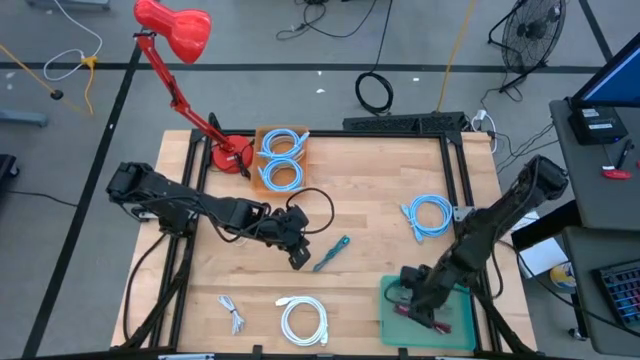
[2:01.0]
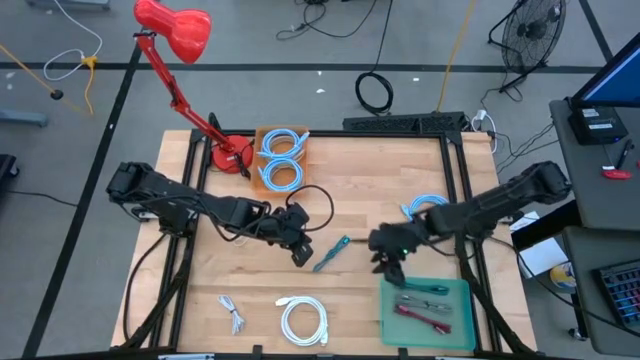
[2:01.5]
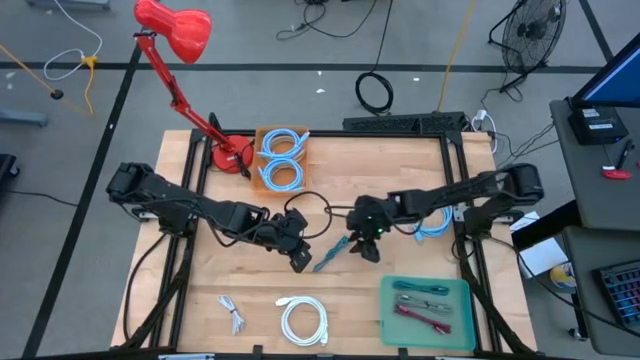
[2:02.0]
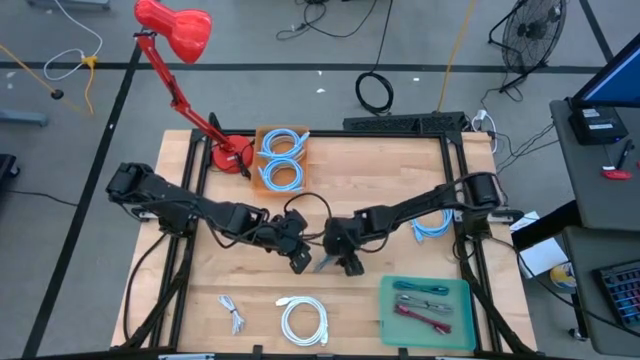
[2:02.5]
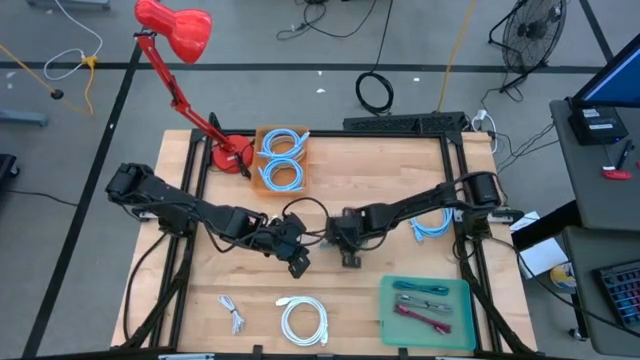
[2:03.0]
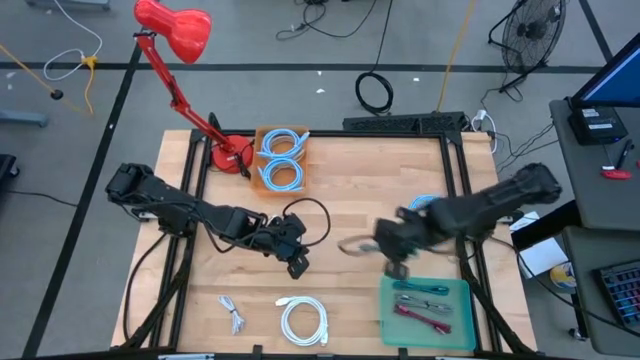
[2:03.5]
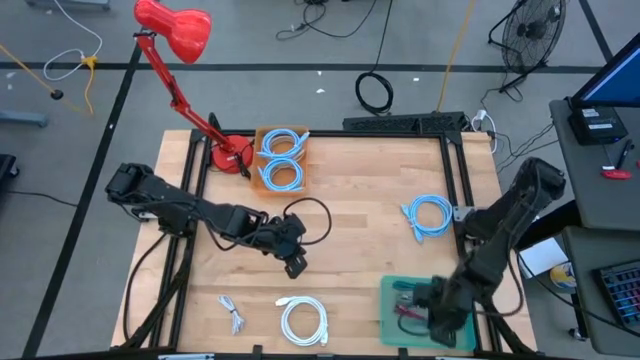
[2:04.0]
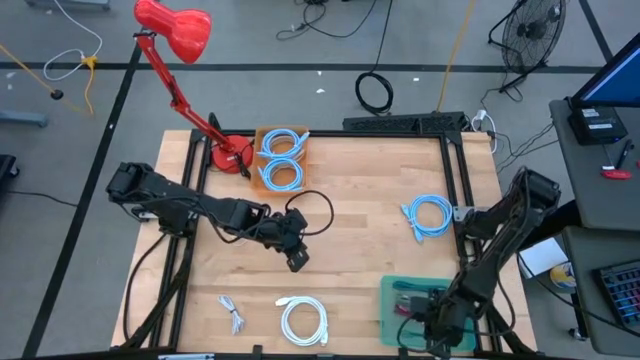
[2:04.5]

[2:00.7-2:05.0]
Task: Pick & Place USB Port
Put the dark blue charger cable into the green bin

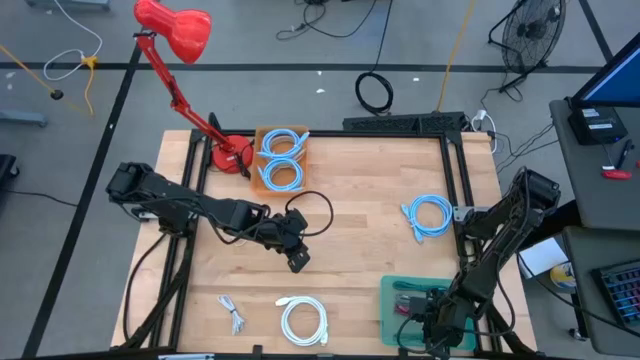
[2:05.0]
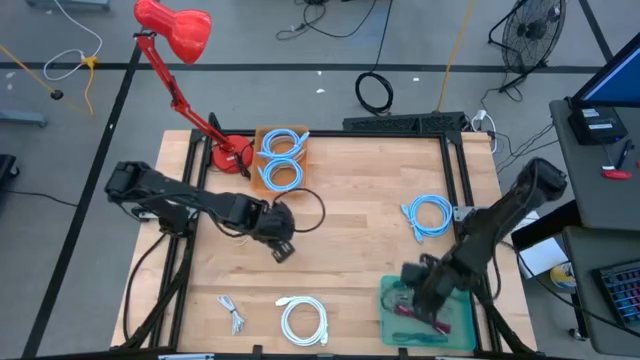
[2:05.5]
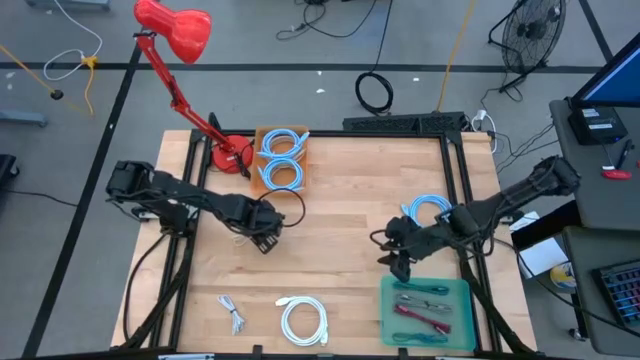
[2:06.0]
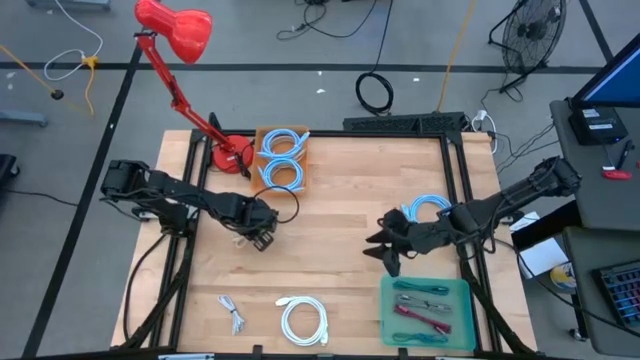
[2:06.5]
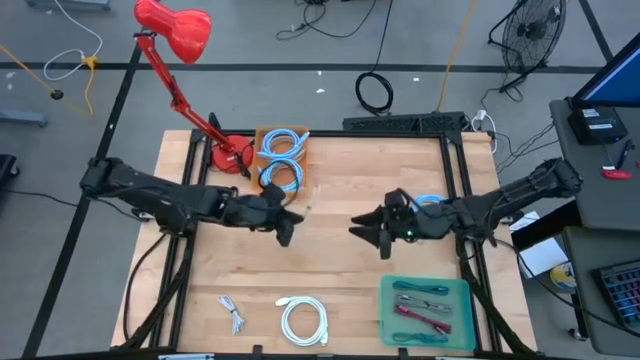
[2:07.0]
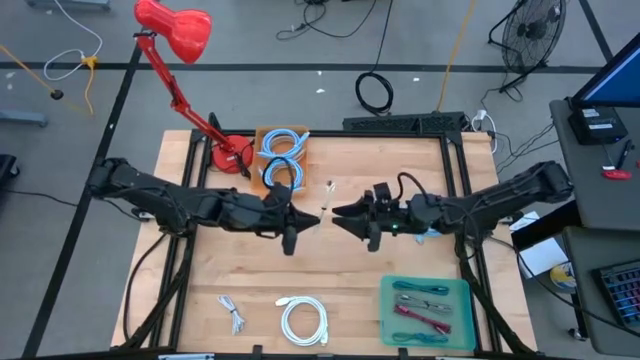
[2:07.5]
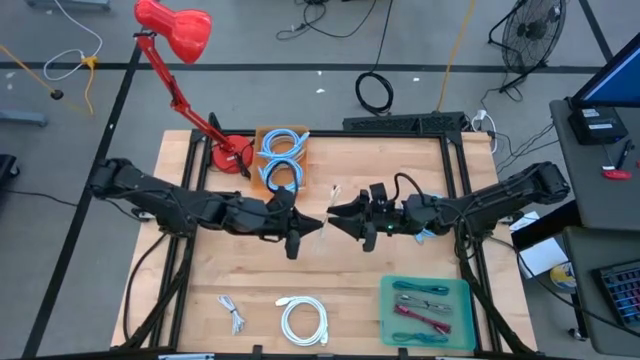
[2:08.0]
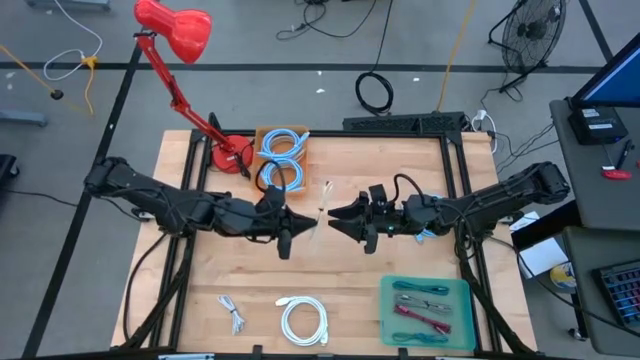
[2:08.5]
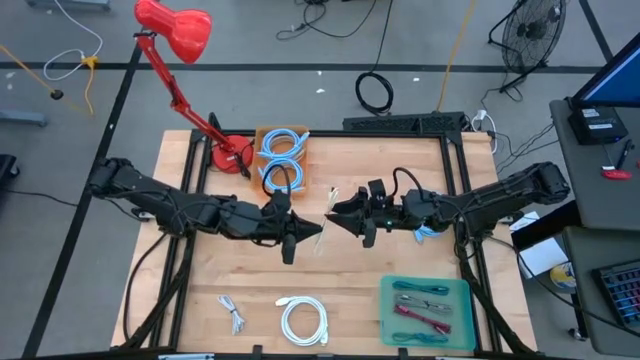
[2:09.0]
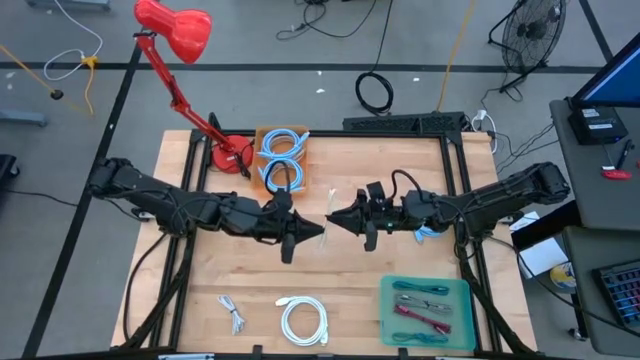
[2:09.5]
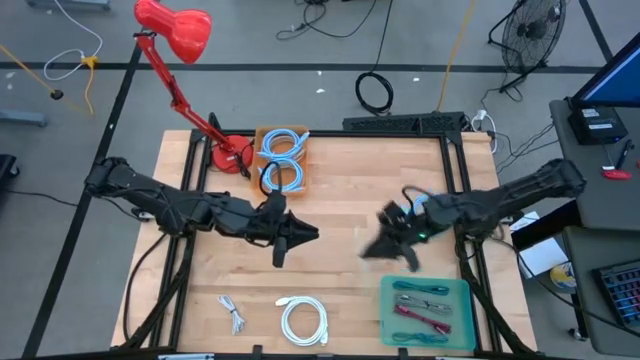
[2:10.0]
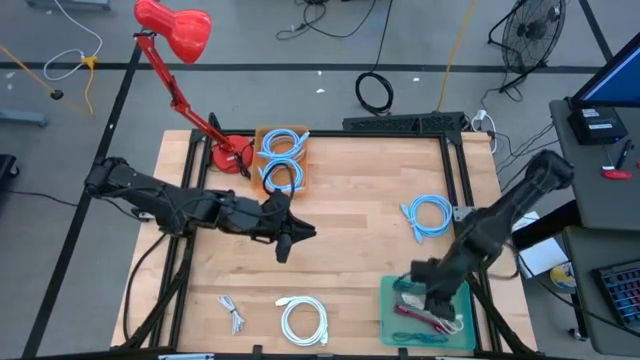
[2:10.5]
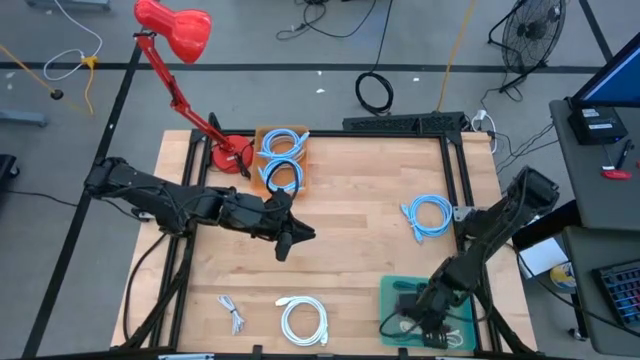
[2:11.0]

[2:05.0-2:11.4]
Put the light brown charger cable into the green bin

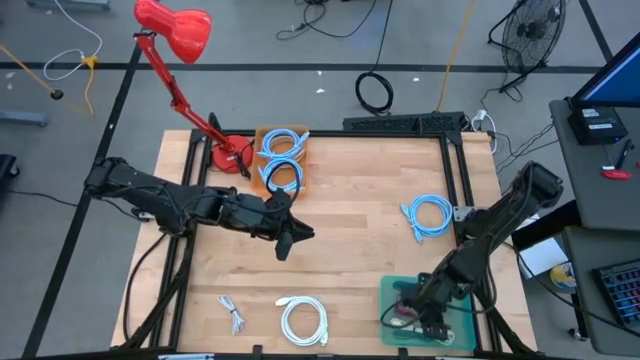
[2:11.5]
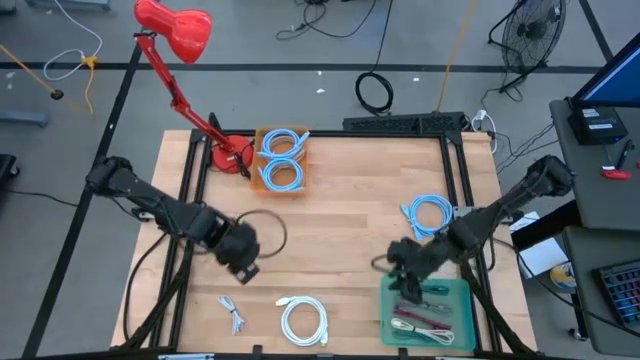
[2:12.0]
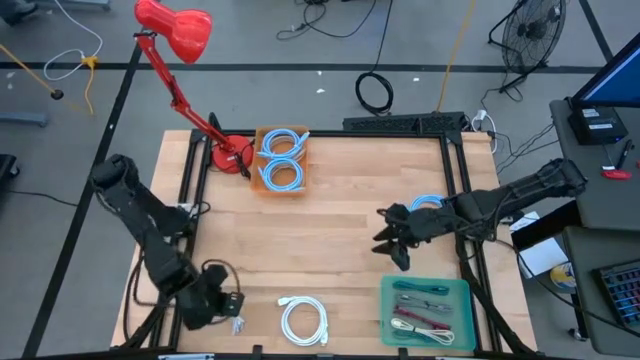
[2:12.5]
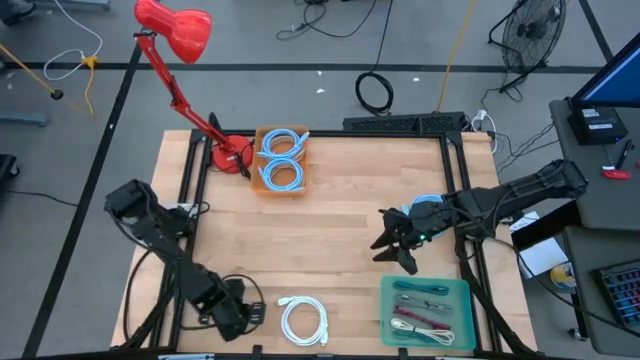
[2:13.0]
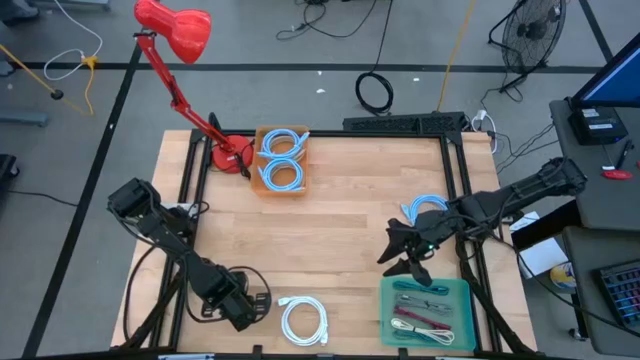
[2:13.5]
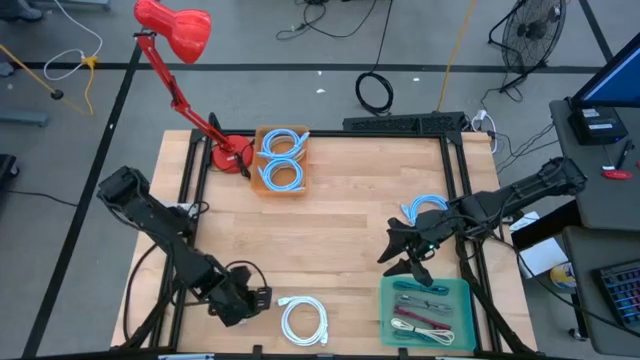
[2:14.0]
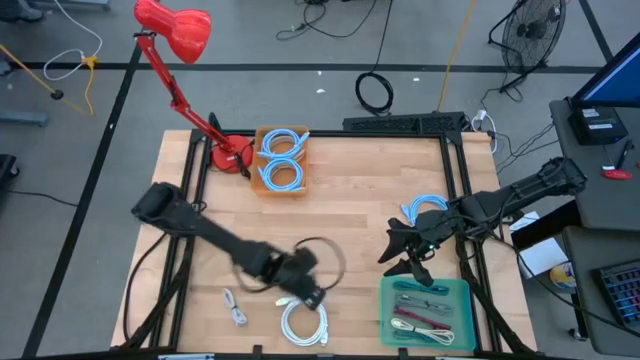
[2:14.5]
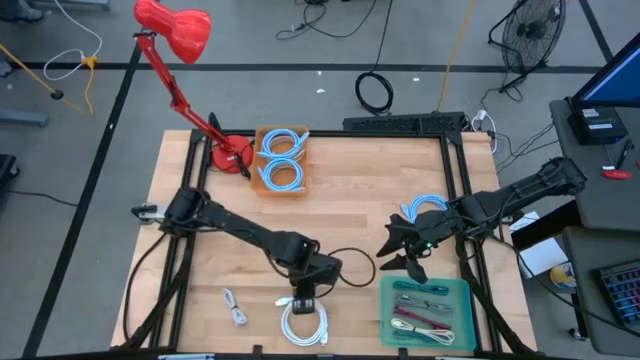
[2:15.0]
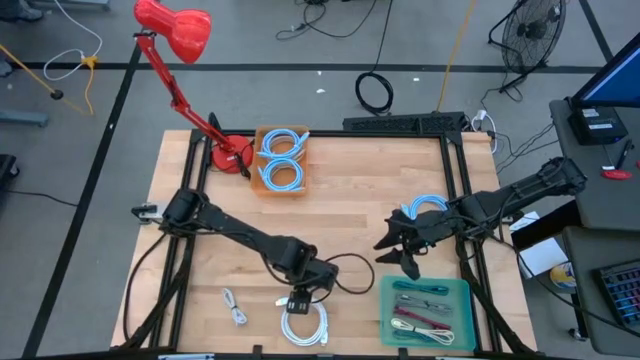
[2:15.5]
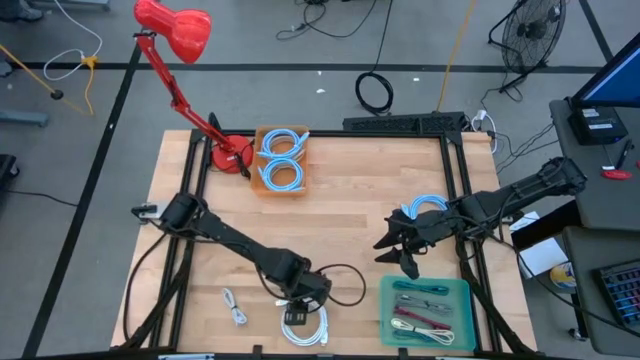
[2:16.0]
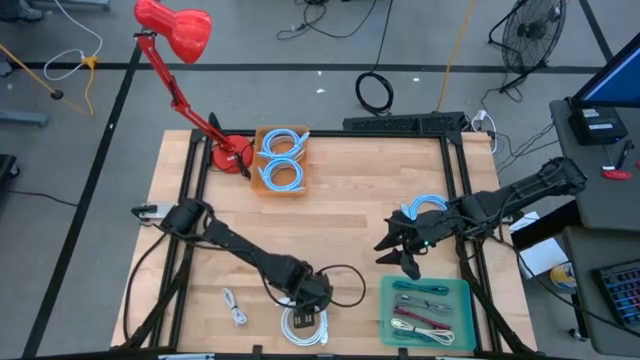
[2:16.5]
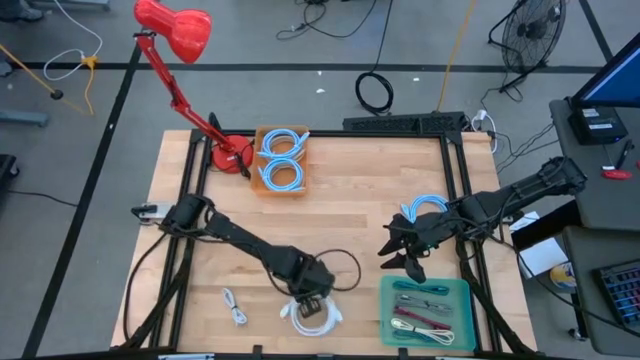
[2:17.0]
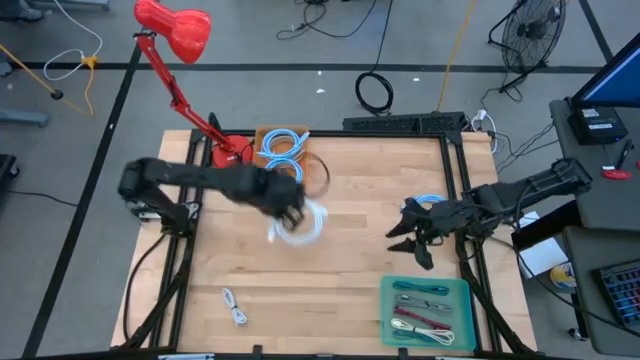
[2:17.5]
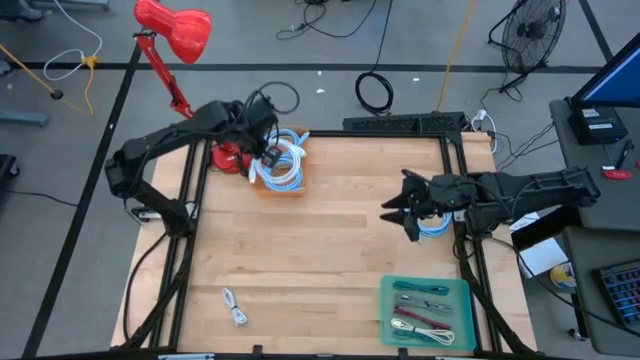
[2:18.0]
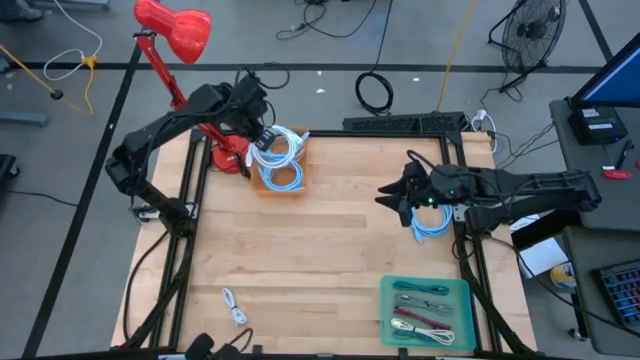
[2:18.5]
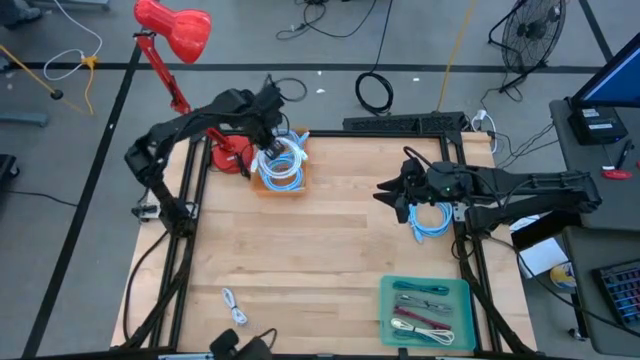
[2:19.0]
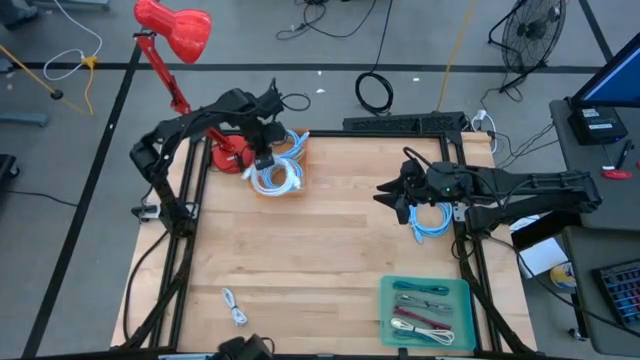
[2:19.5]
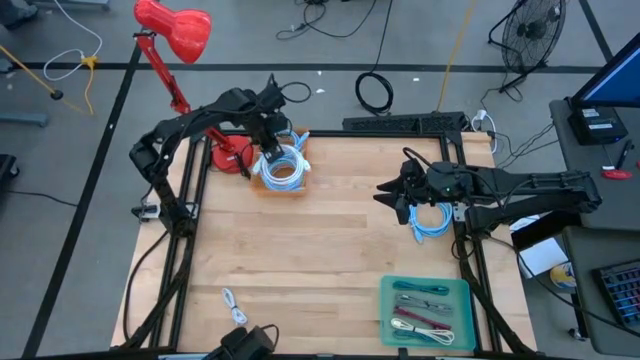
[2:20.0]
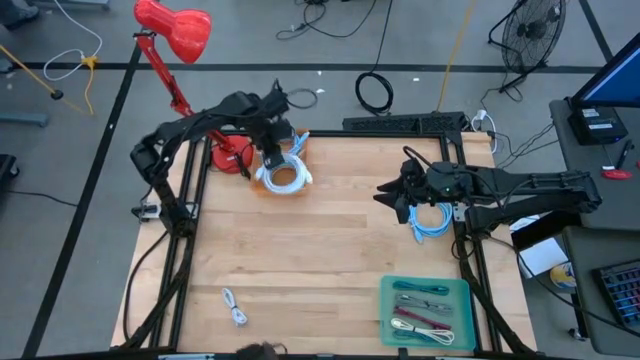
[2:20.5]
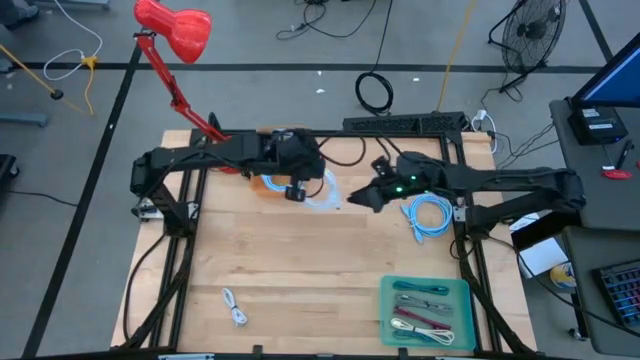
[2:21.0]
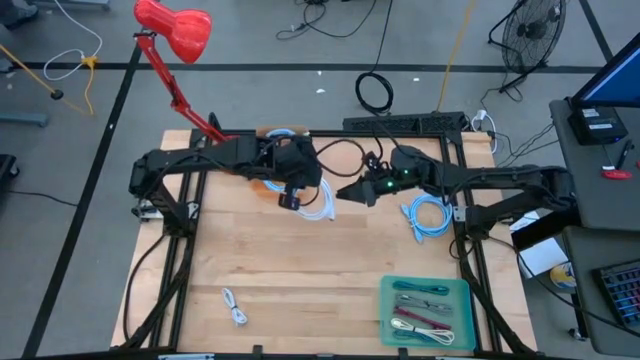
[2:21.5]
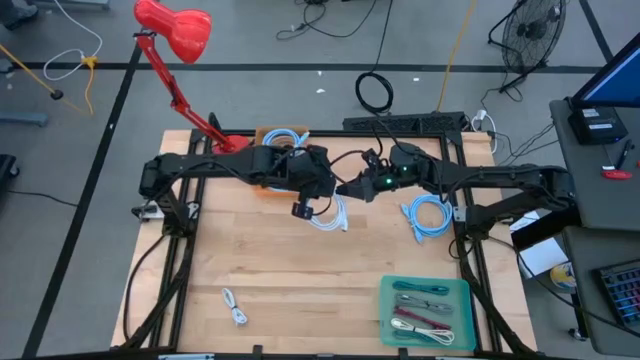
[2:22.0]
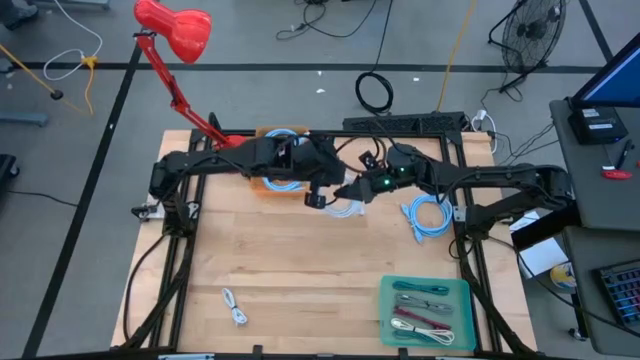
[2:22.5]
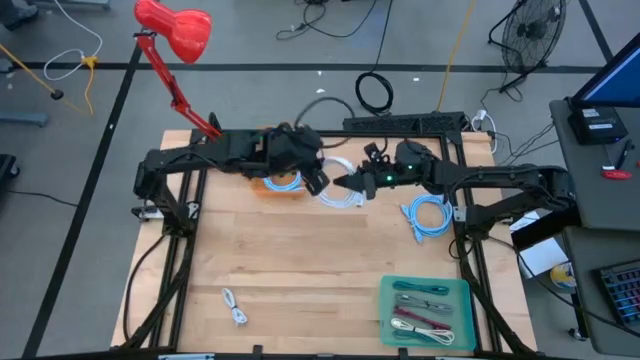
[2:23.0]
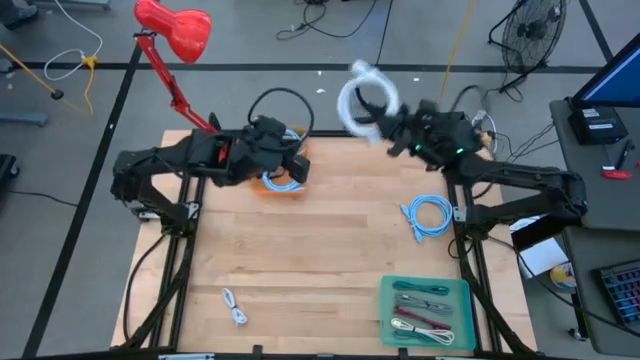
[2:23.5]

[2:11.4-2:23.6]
Put the white wire cable into the orange bin
